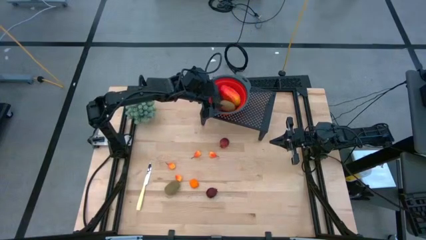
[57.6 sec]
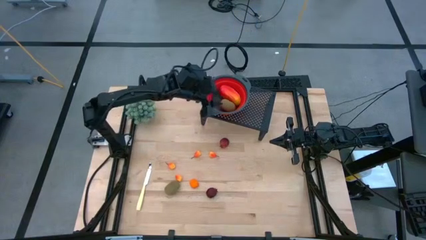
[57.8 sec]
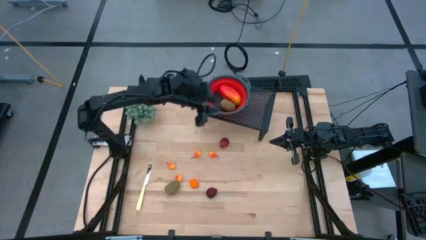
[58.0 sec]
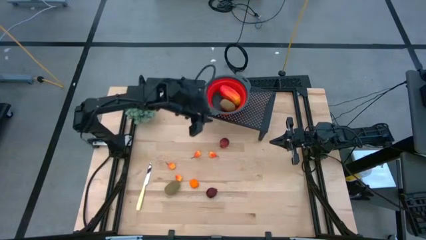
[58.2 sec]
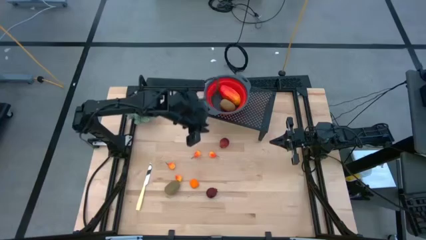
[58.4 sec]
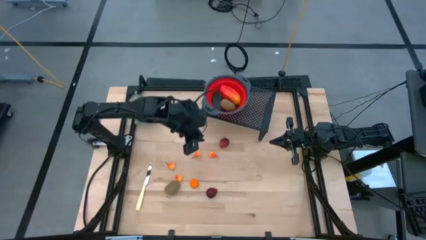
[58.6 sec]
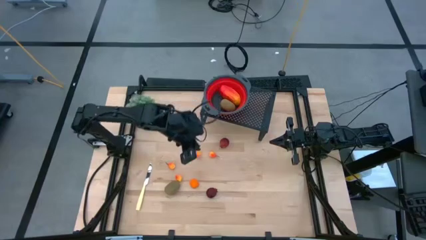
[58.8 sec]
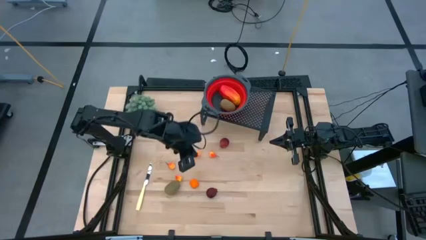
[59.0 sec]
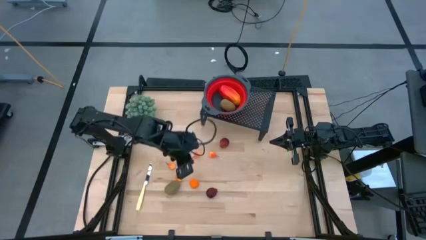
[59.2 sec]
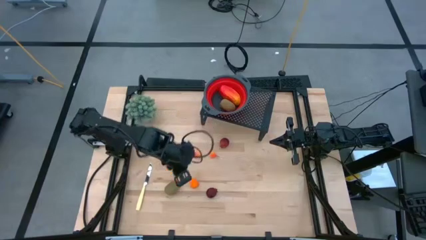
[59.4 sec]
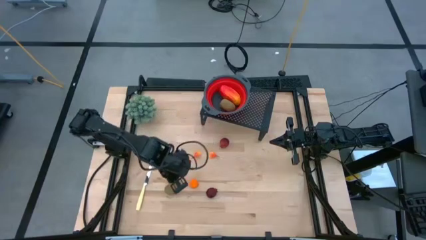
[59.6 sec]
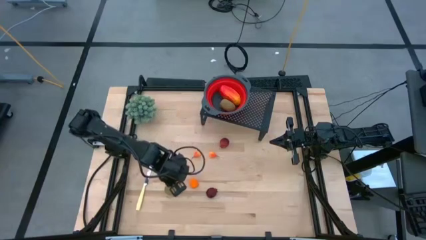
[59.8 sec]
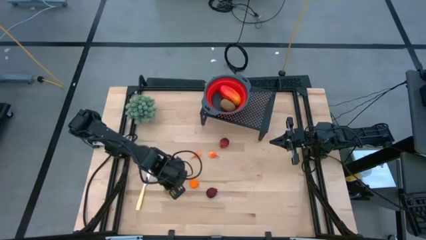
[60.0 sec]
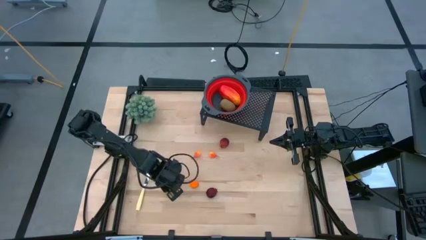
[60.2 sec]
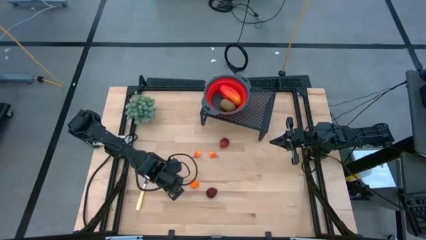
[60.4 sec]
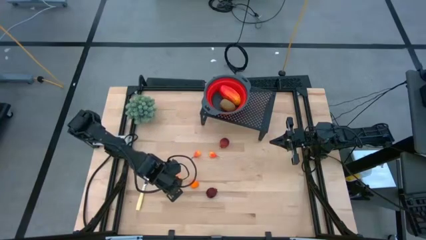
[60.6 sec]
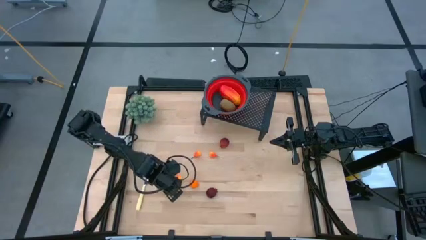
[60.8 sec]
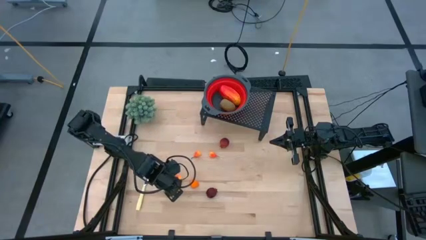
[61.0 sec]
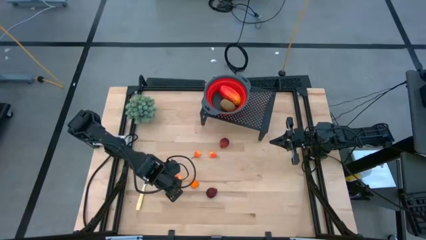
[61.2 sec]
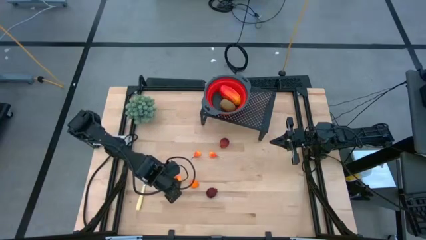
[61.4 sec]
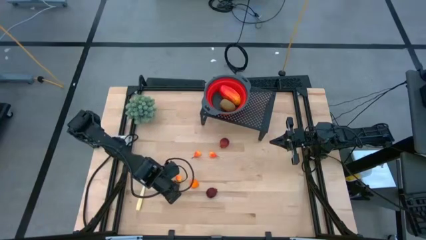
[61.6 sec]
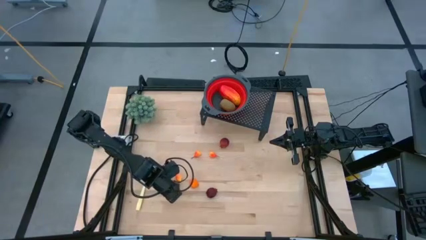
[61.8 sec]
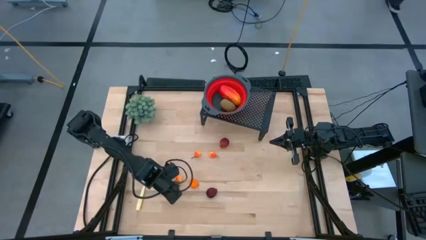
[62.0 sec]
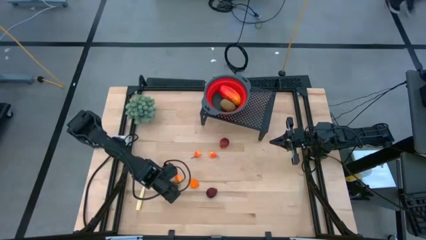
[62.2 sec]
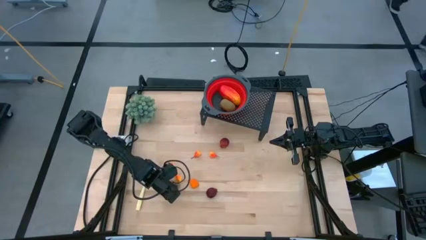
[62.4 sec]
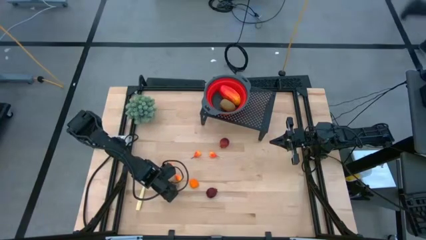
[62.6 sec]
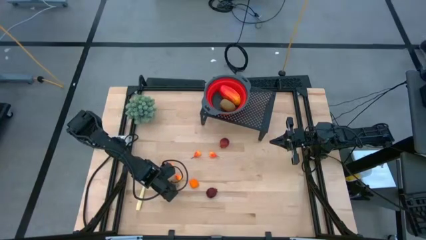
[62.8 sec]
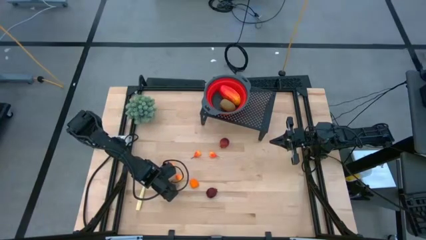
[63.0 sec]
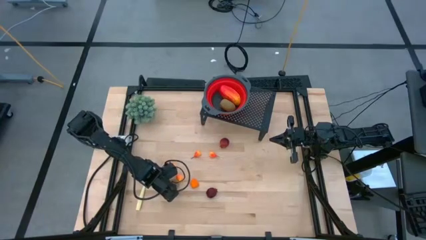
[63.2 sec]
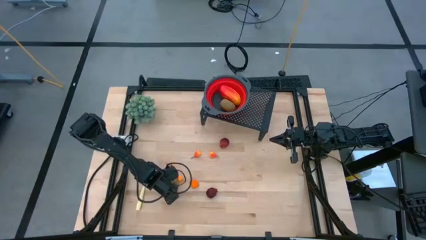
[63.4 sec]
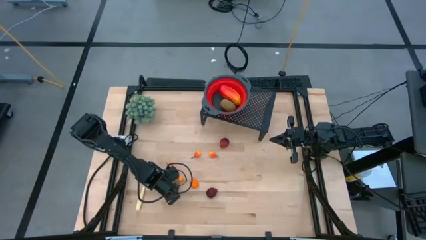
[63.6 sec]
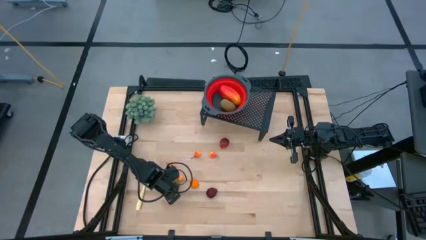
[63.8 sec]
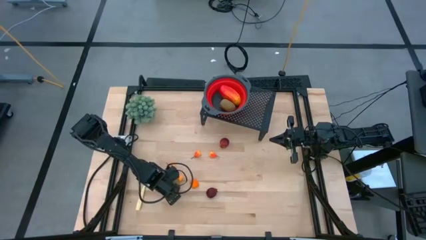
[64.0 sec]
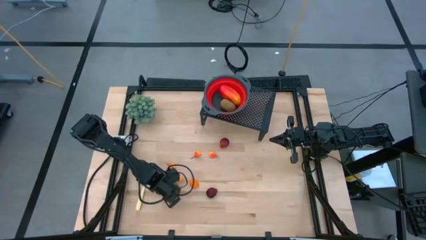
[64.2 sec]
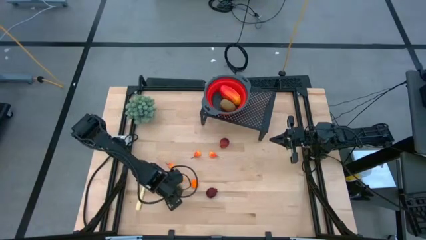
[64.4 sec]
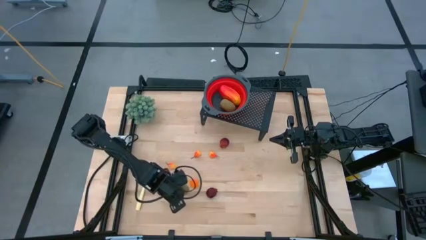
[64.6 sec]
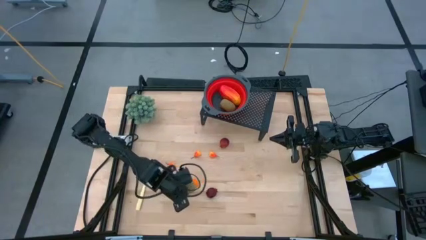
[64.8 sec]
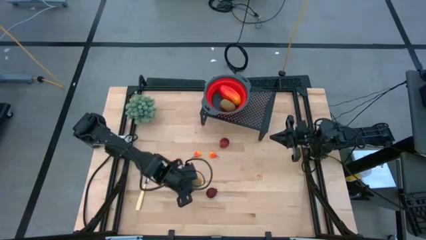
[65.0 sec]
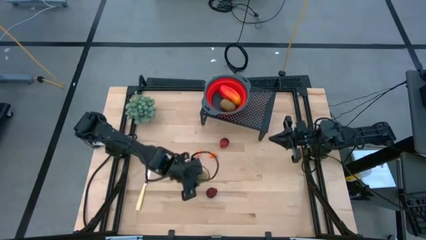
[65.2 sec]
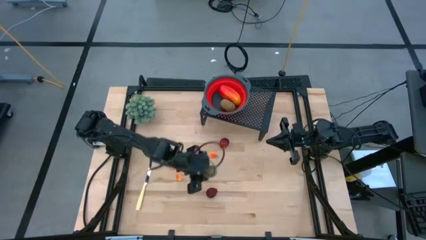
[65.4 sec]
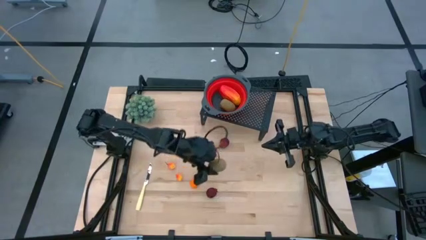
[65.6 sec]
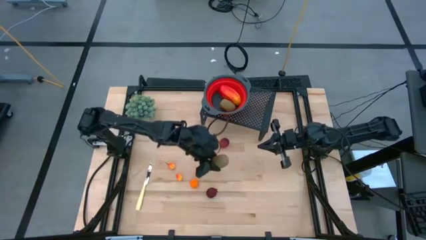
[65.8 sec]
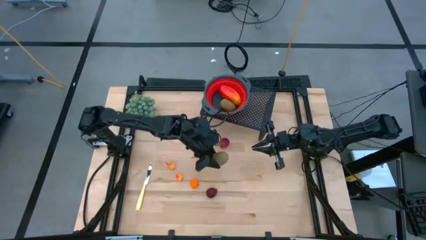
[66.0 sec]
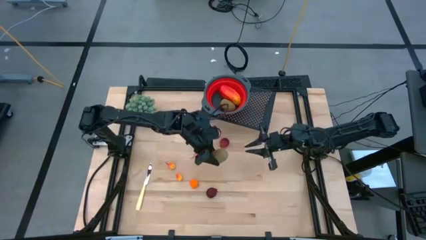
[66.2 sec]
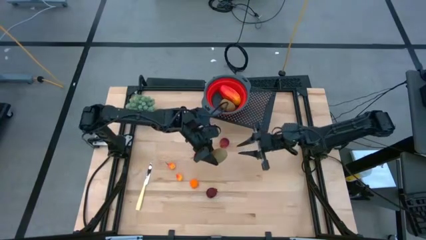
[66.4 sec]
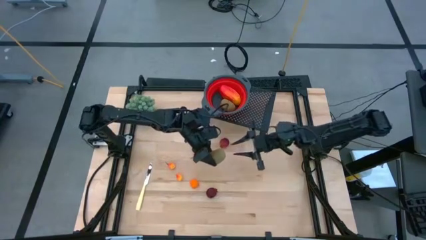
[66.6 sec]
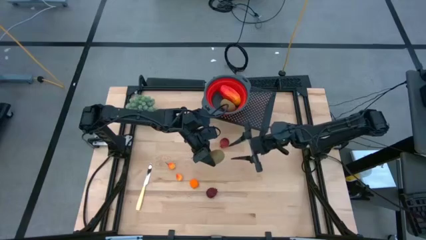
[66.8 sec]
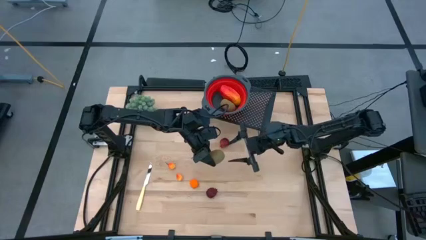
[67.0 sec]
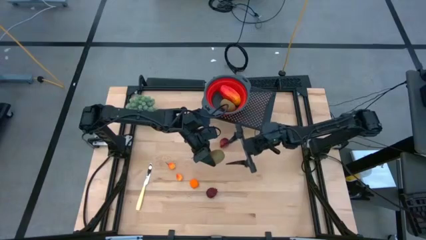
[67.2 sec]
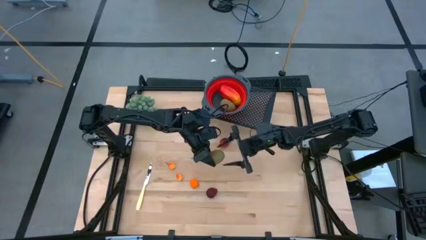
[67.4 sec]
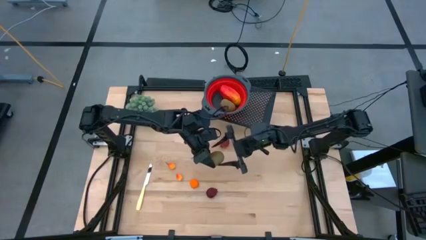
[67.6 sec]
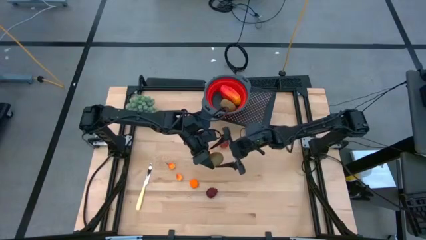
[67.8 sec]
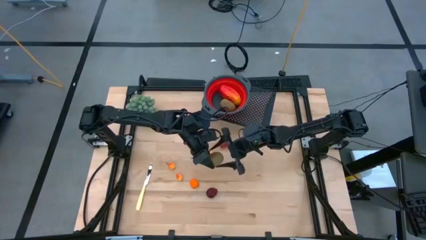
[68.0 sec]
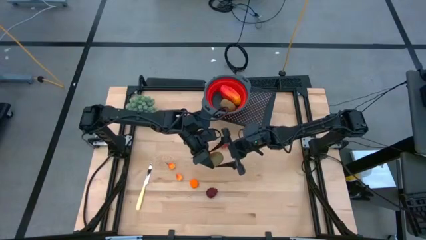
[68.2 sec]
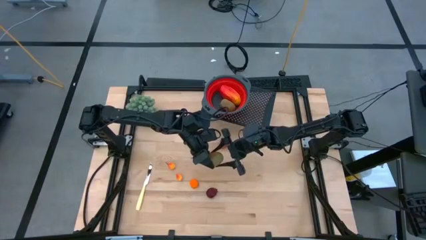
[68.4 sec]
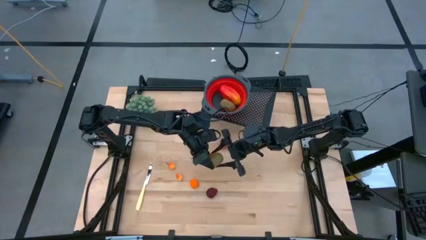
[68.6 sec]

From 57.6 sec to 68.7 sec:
Task: Pick & Place Fruit
Put the kiwi into the red strainer bowl on the shelf
